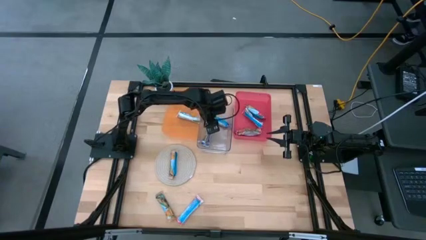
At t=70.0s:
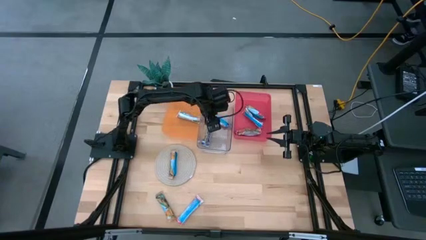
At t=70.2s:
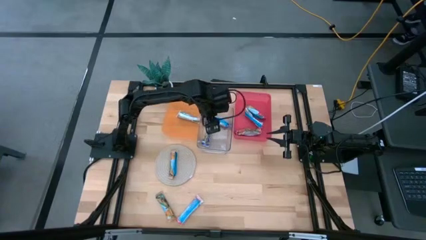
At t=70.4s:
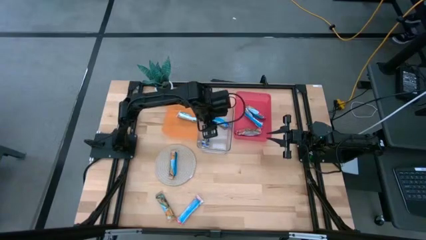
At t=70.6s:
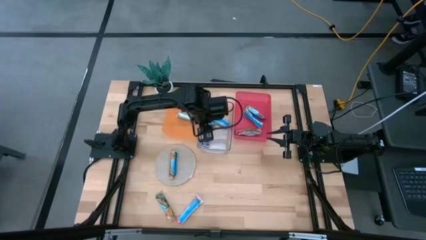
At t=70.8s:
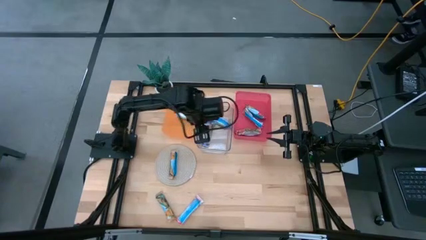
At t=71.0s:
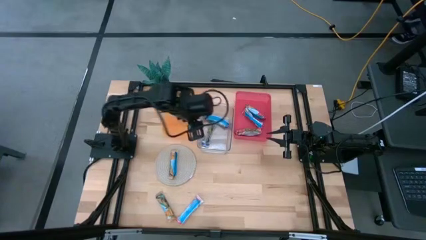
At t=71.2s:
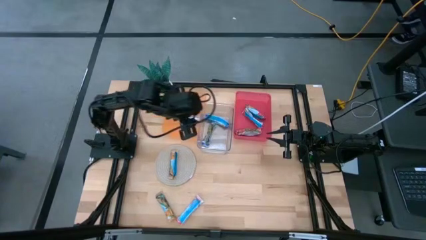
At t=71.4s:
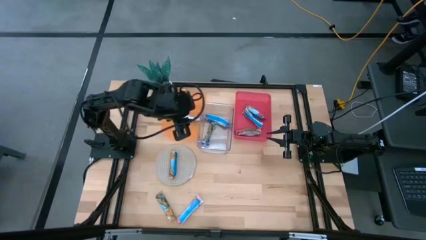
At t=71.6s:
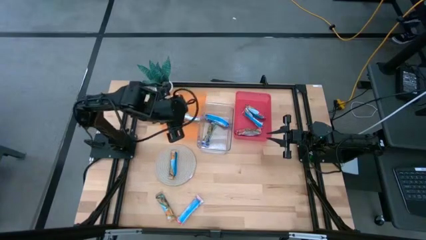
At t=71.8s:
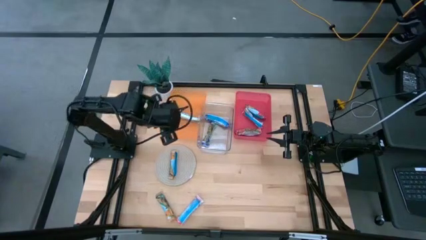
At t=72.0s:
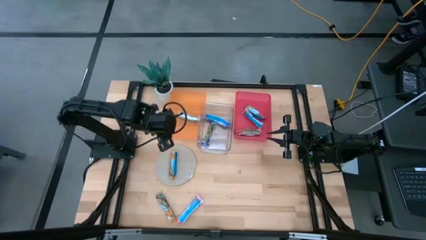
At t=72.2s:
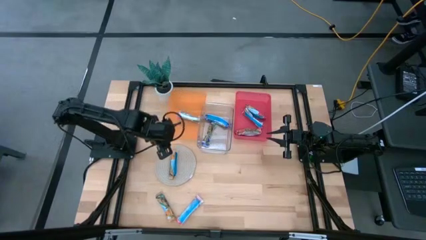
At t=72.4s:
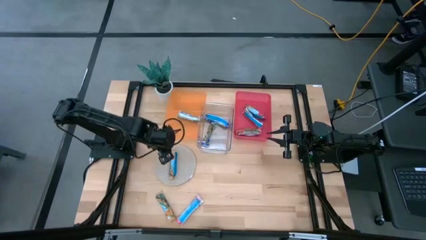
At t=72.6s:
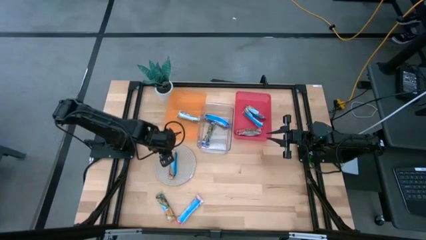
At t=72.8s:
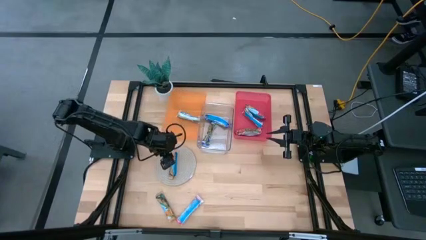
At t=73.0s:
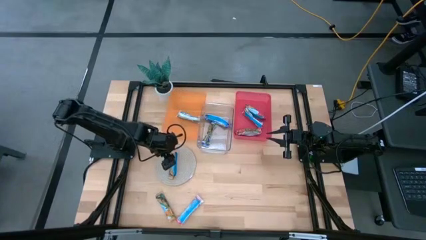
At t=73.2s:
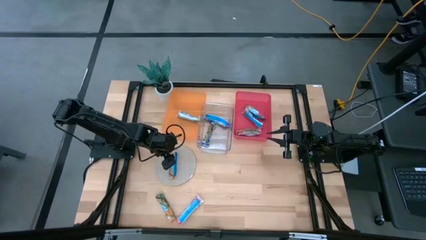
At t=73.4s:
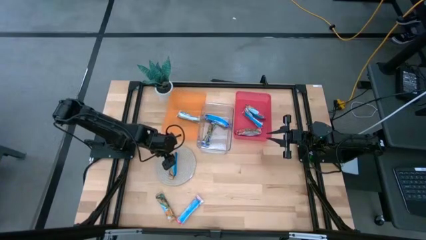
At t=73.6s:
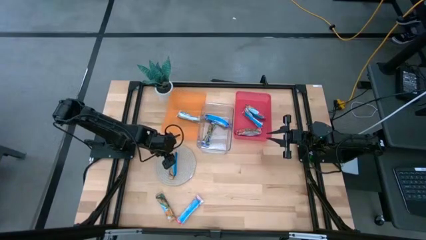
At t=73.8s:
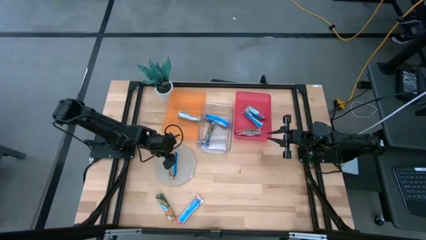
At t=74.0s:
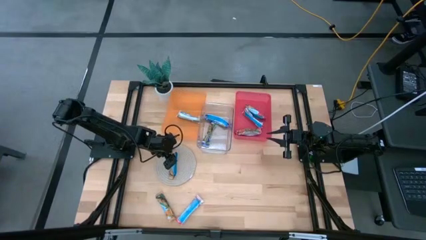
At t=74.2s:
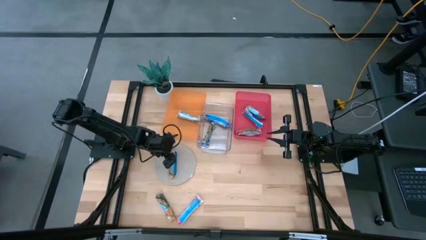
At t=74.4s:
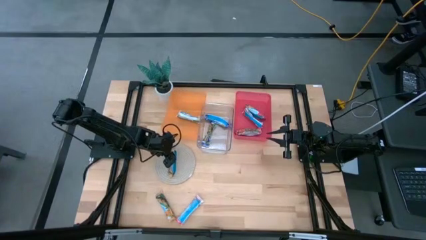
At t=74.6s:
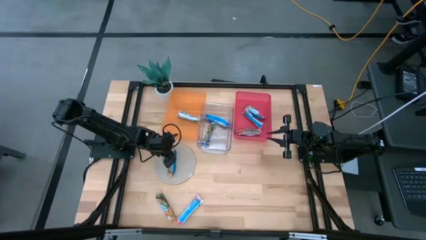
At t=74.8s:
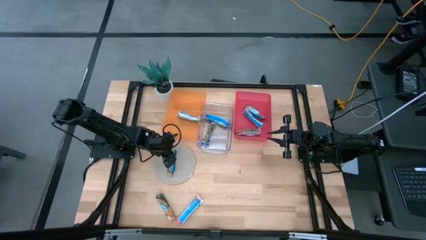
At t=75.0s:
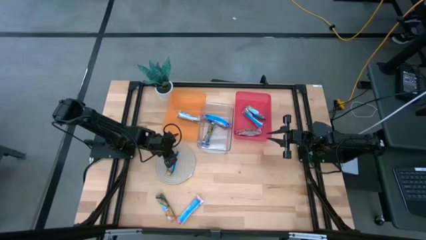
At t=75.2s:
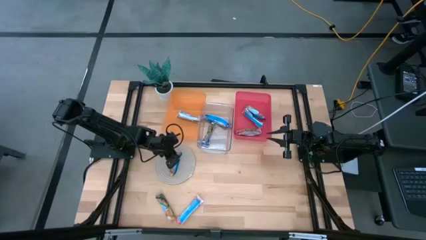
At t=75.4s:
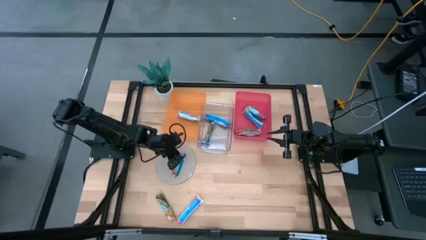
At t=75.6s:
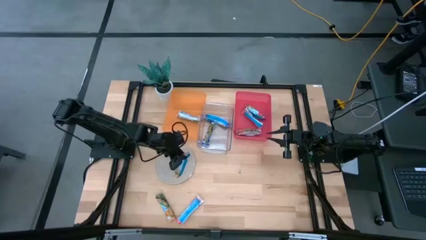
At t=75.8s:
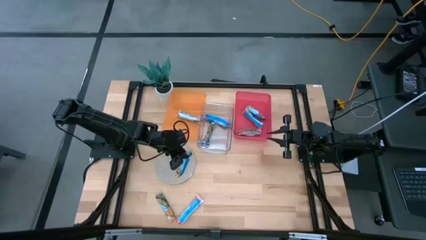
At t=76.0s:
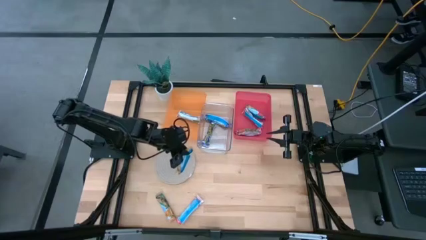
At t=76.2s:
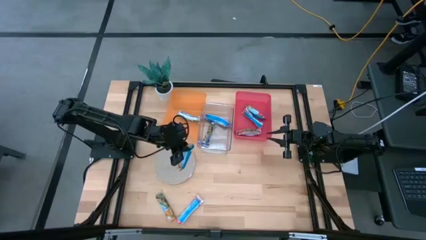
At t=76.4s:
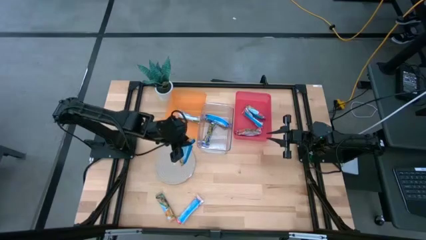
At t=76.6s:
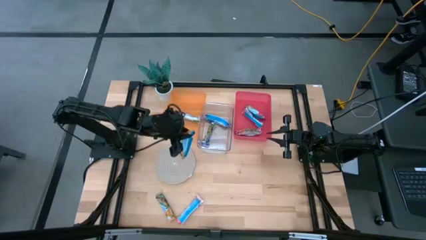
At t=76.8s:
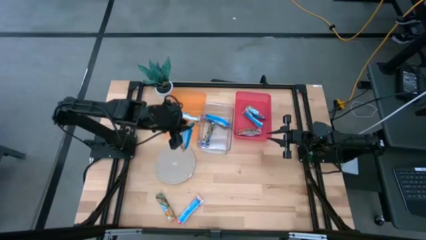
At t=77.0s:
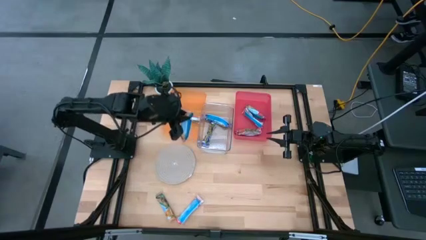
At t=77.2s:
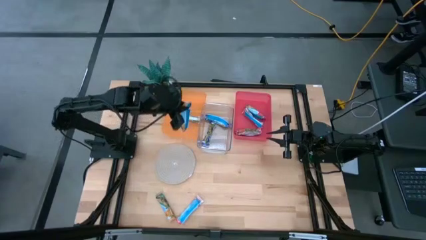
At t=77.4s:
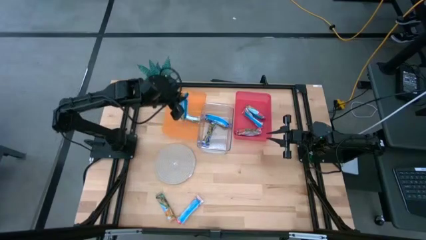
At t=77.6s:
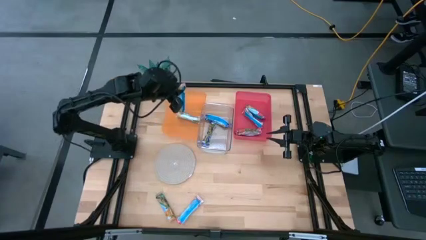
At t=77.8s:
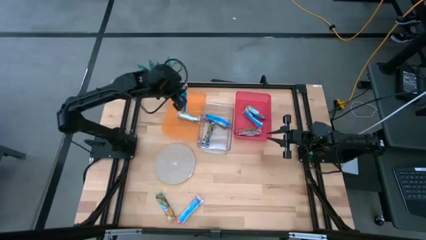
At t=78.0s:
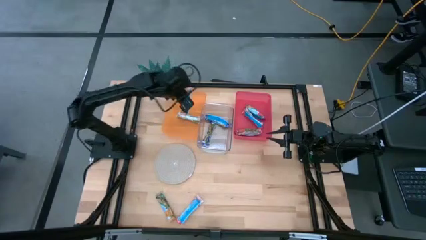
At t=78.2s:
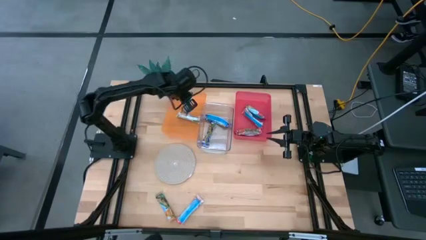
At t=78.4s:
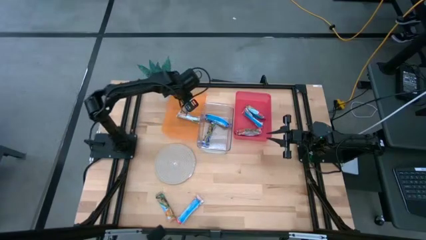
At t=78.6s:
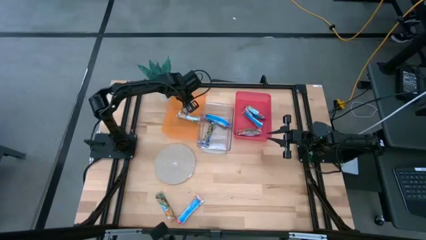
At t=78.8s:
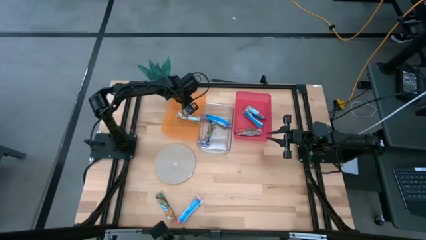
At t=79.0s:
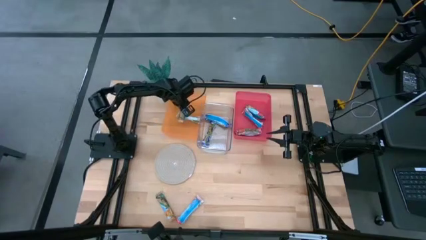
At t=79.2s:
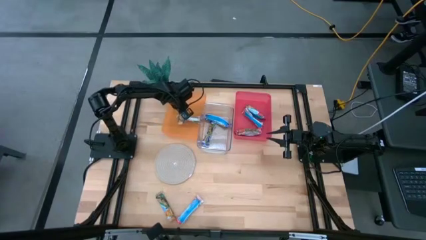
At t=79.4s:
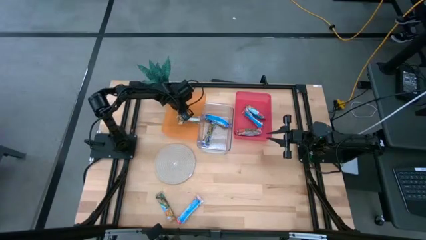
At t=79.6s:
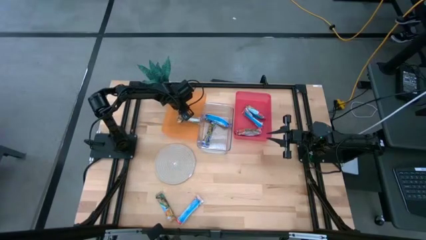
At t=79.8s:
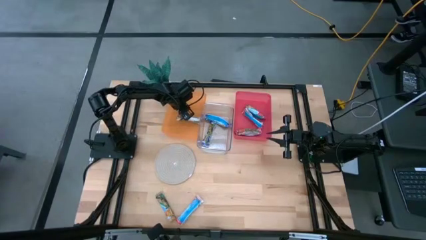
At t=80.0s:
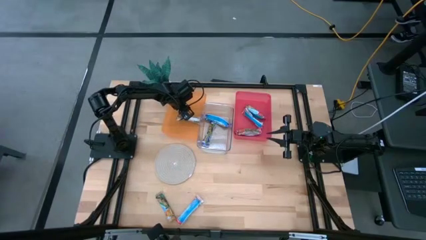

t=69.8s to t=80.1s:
Task: Pick and place Granola Bars by type
Put the top yellow granola bar into the orange bin
